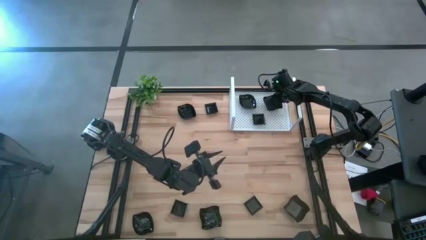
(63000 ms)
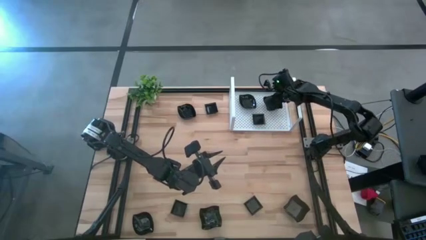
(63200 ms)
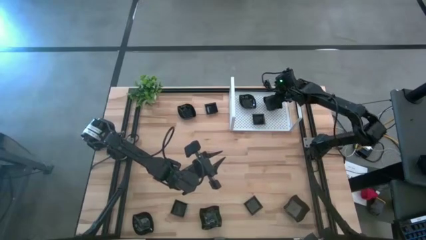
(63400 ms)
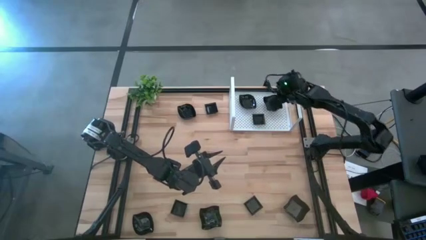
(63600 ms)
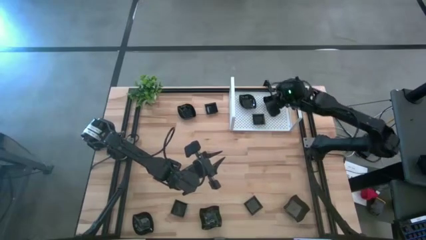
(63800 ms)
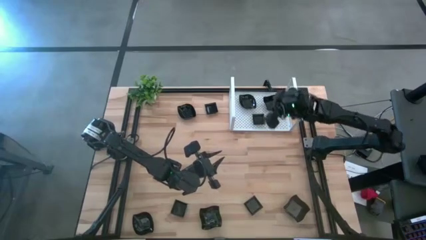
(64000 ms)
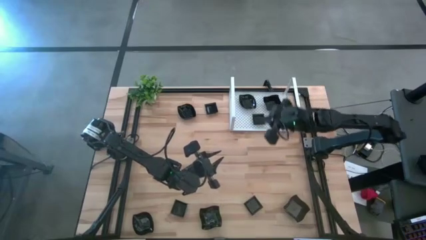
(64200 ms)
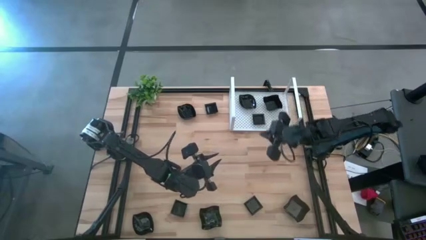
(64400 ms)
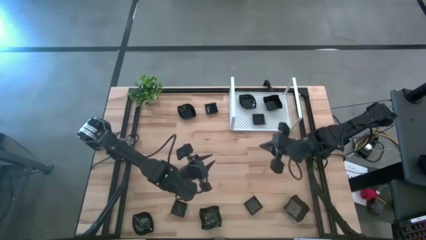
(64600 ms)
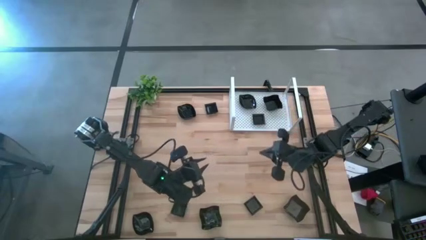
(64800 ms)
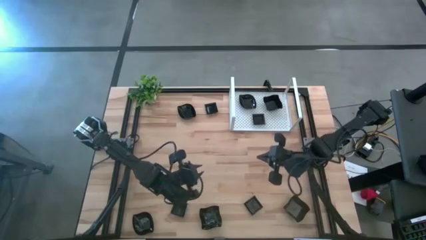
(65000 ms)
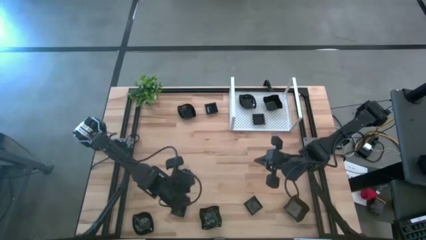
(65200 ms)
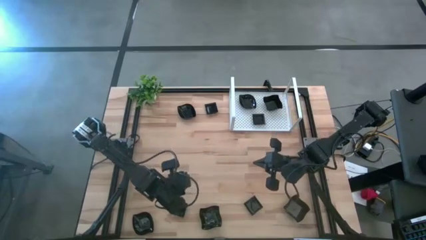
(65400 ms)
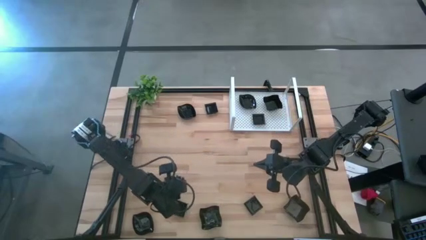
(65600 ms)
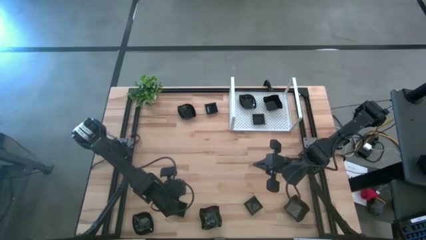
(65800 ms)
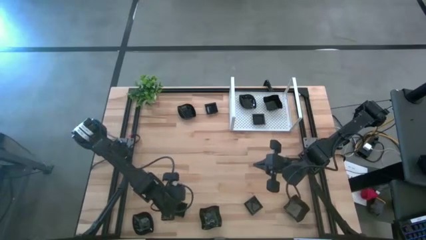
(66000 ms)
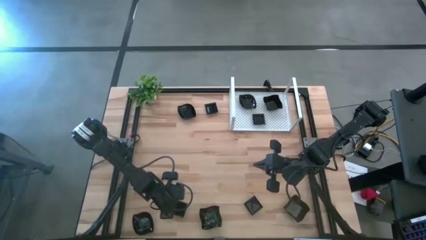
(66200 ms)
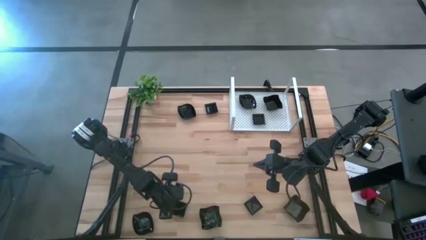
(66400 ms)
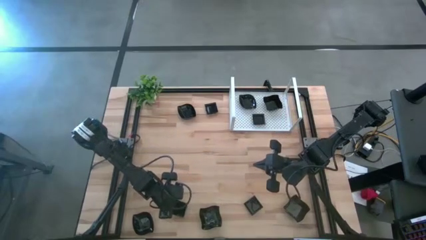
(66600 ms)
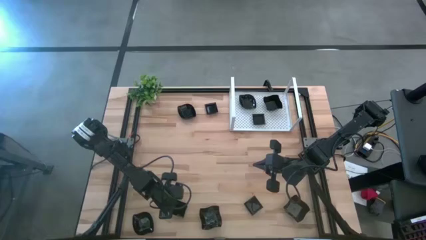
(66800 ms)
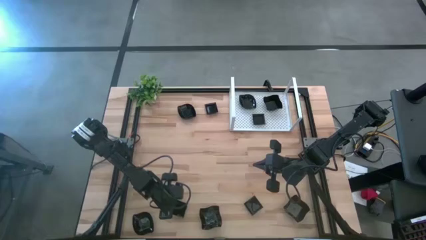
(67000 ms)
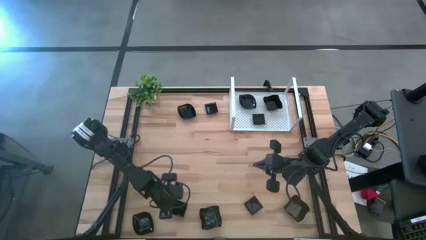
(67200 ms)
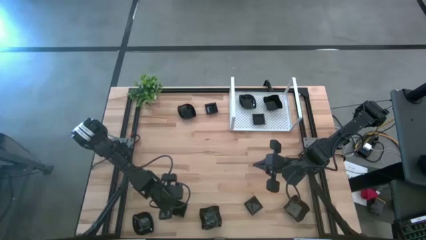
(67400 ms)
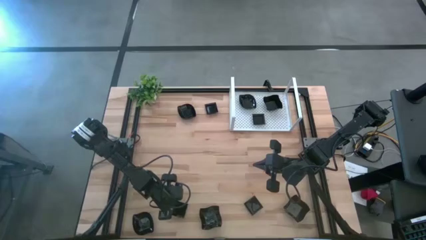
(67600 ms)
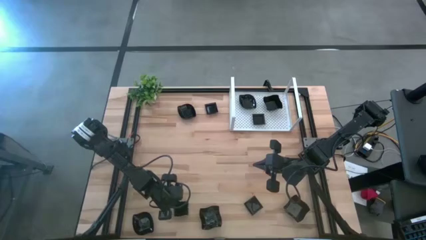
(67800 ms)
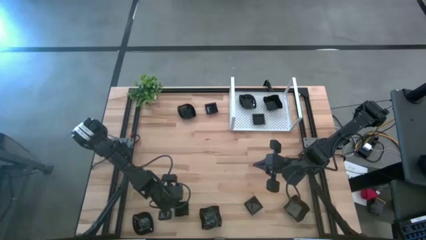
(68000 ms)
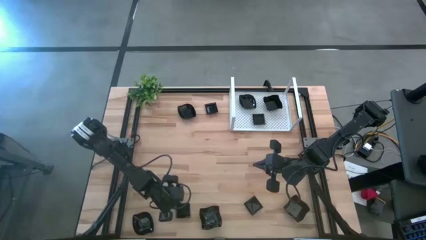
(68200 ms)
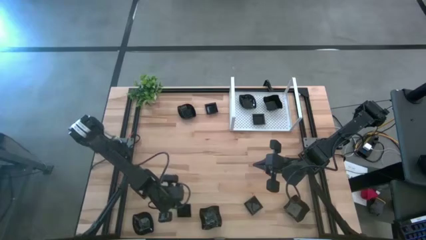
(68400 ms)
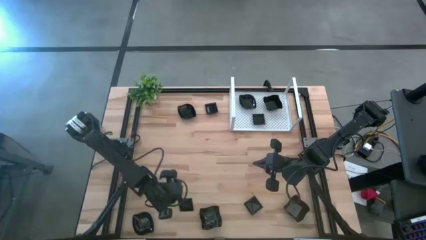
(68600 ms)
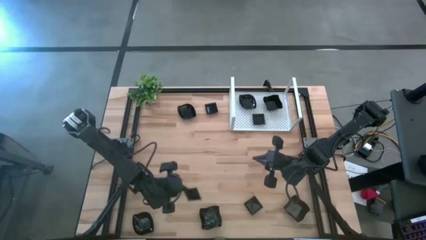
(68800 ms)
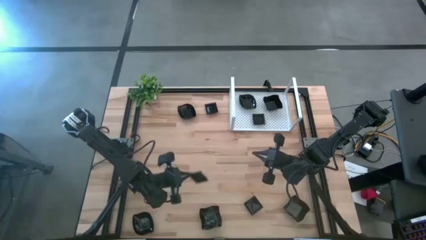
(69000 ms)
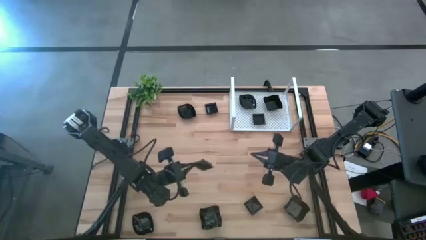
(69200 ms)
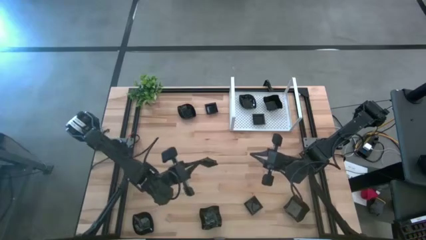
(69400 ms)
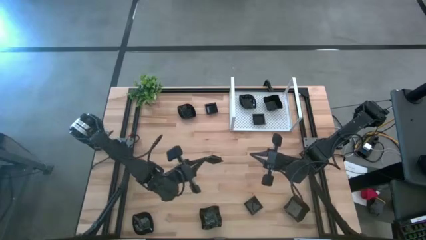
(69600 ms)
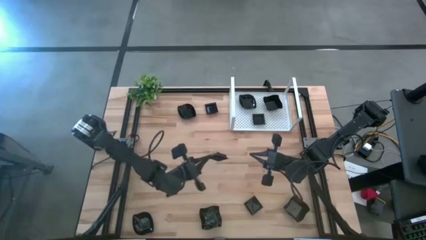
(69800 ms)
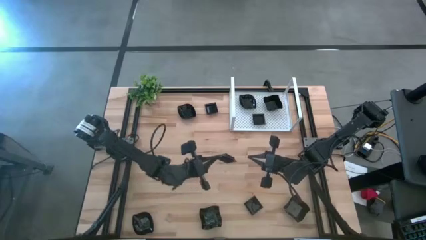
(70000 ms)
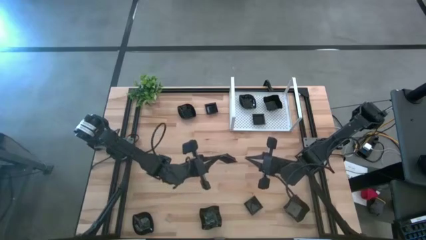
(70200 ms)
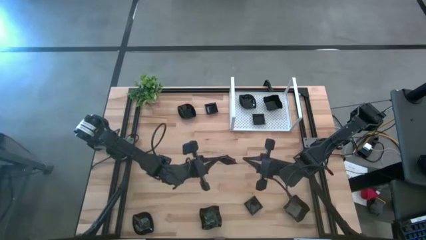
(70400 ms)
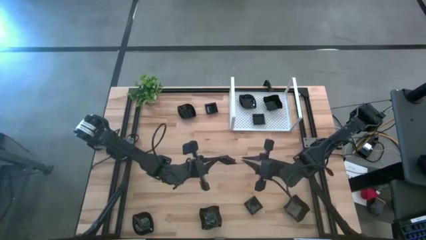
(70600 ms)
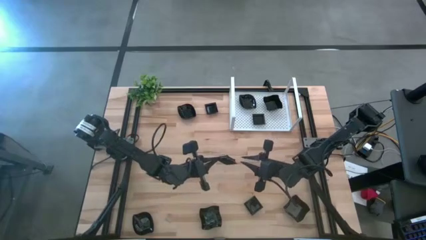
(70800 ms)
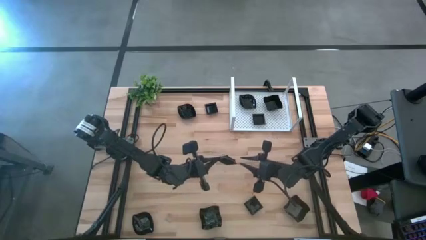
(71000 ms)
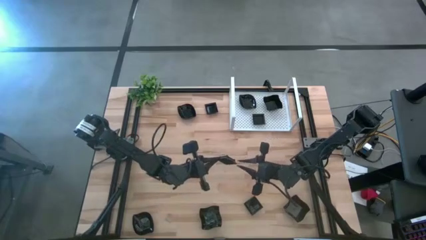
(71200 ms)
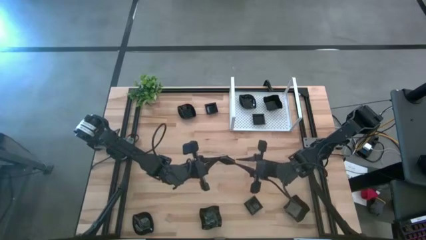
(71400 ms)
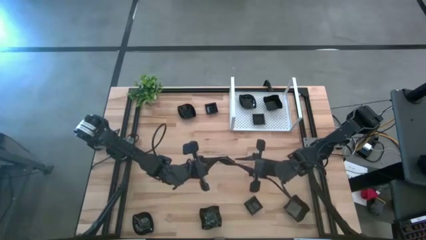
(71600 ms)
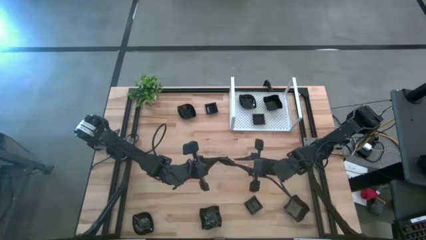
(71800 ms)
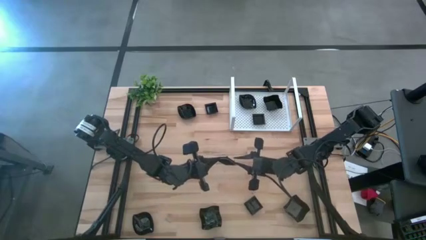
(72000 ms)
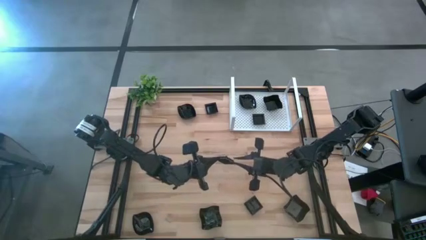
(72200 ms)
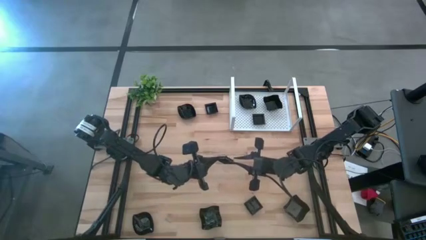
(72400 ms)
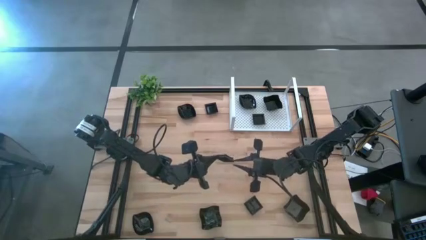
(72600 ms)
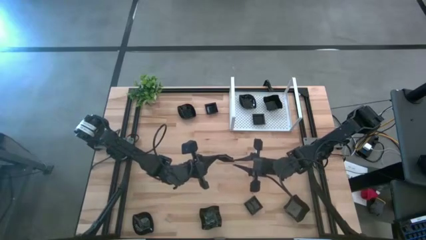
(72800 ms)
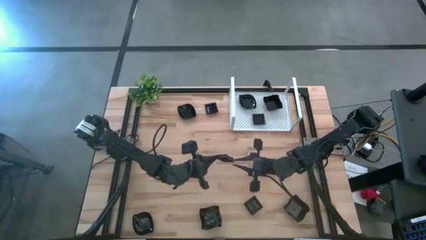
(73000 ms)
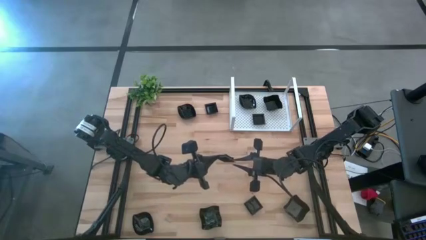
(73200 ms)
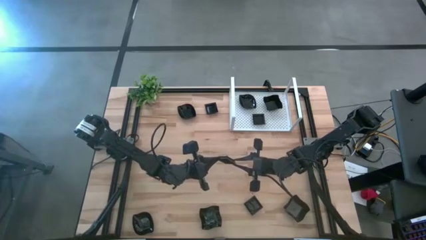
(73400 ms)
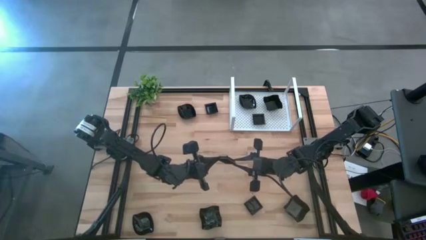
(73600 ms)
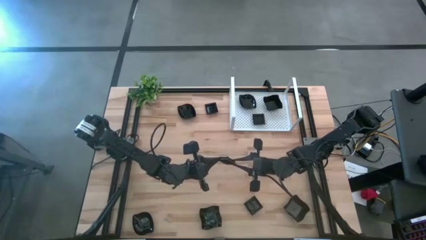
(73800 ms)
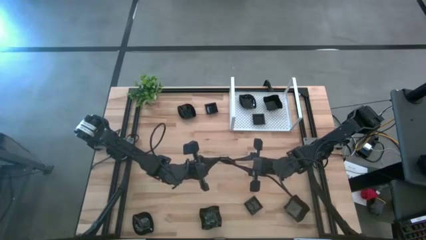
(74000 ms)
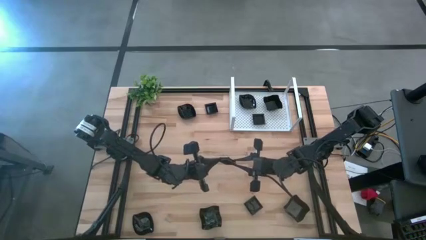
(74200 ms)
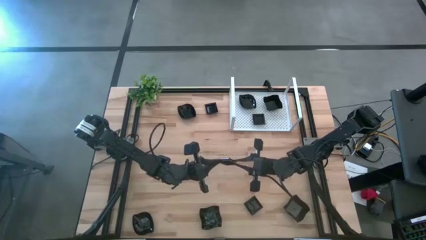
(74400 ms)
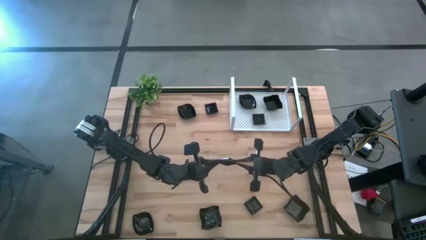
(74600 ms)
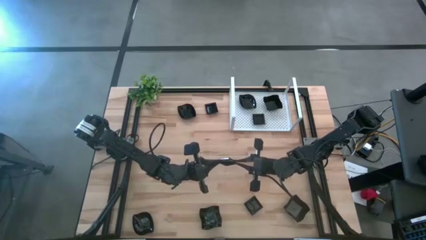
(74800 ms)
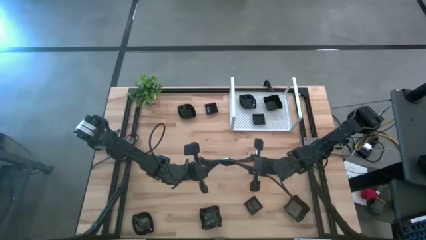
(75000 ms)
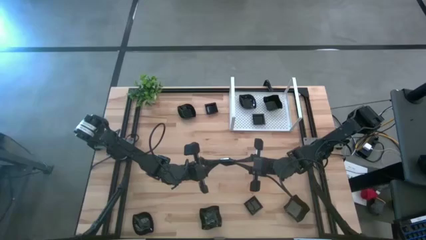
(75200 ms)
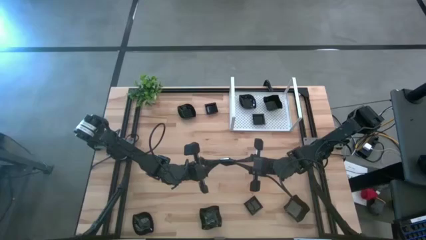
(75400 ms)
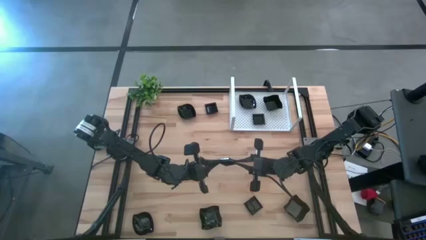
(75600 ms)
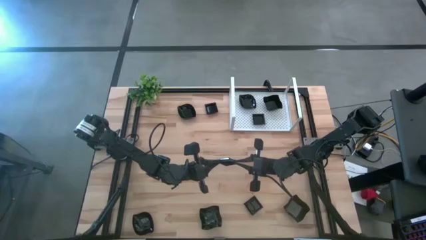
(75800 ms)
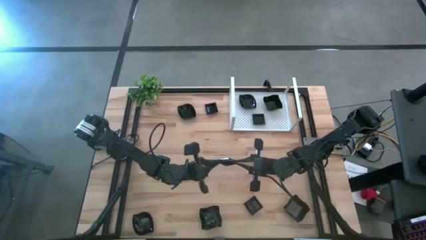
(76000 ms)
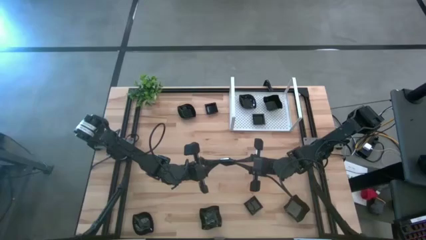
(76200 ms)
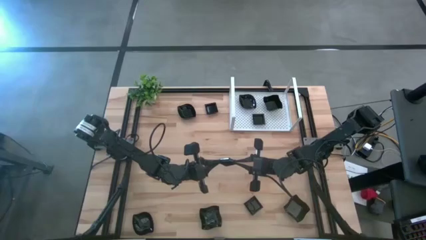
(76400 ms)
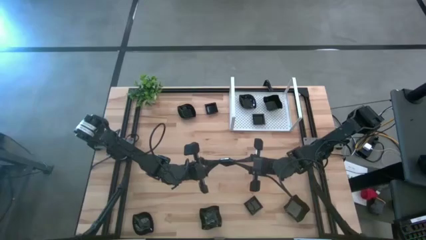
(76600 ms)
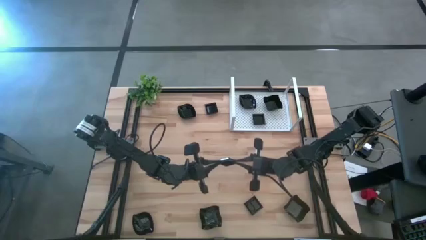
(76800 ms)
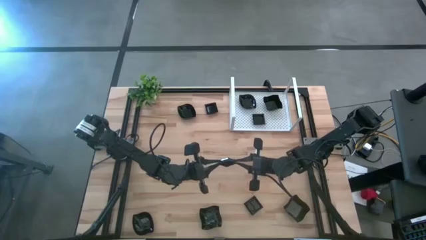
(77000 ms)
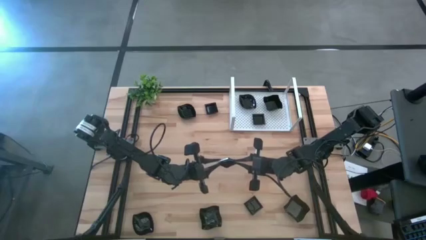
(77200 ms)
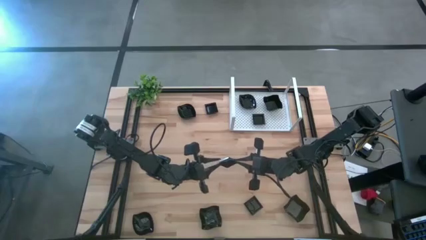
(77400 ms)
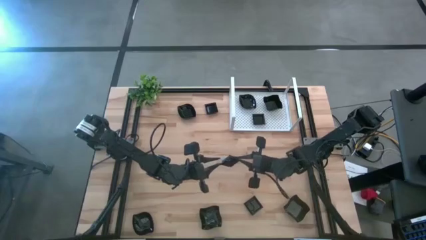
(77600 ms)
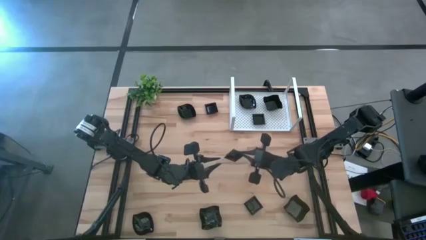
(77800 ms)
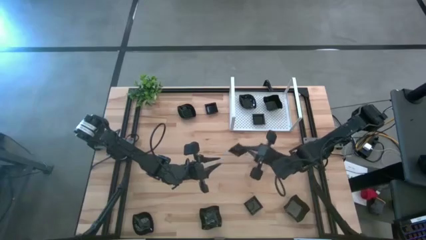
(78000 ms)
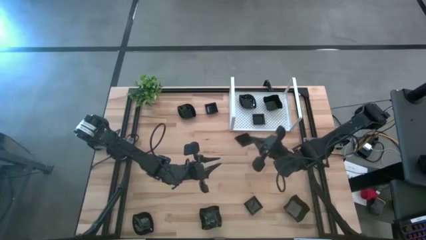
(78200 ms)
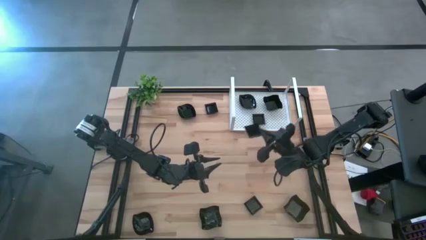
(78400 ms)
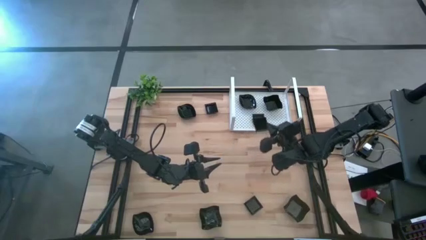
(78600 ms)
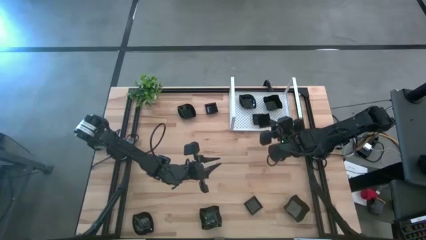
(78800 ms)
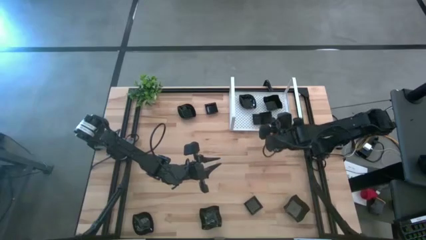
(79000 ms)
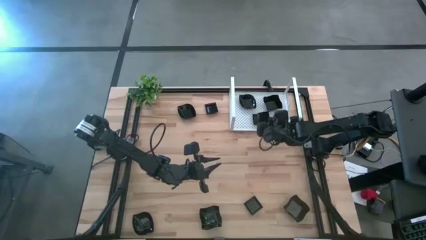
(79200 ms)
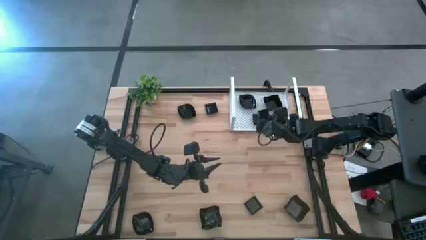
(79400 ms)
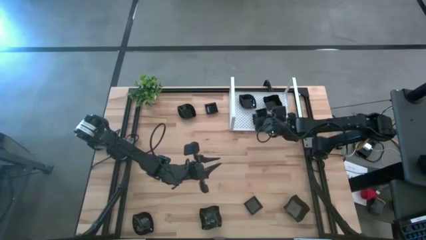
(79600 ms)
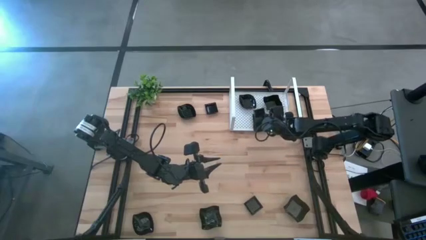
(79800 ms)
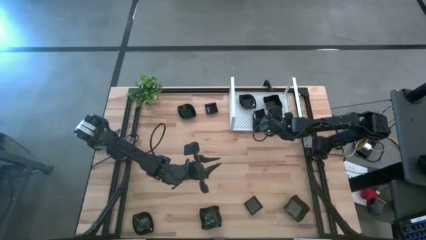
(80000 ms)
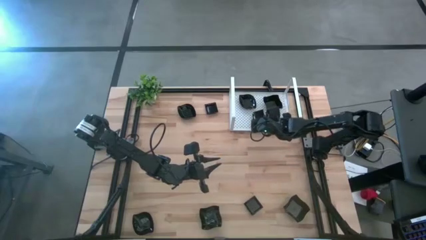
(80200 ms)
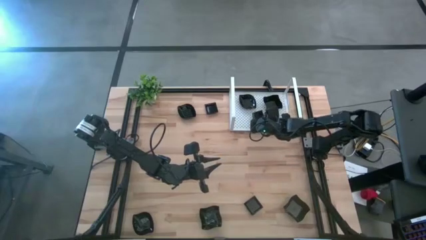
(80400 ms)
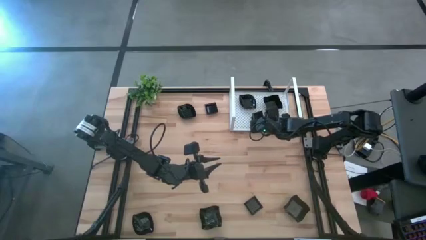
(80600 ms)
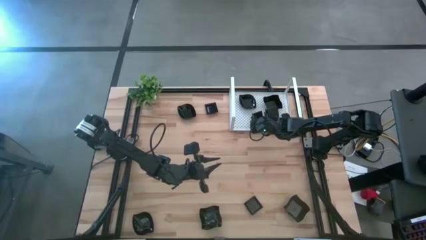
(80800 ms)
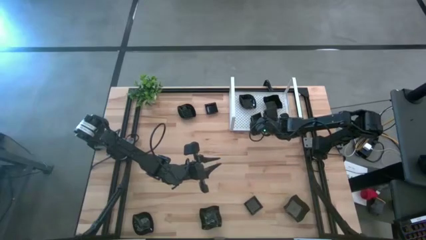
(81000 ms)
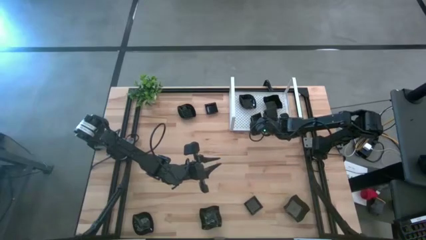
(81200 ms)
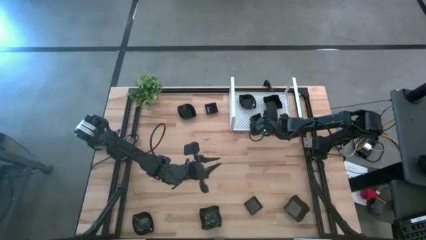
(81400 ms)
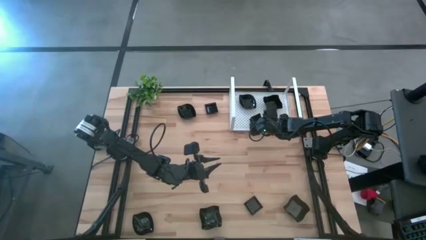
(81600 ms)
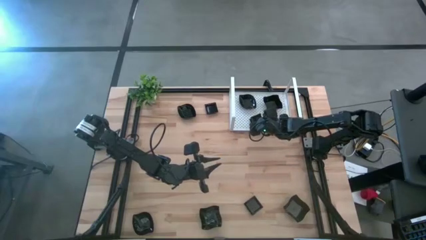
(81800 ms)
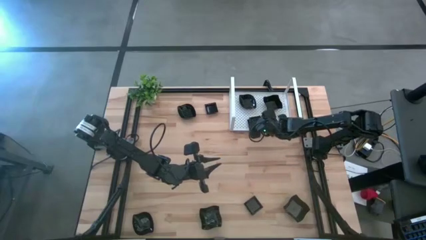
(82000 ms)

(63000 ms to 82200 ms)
Task: Pick & Place Mini shaped plates
Stack the square plate on top of the other square plate on the shelf
